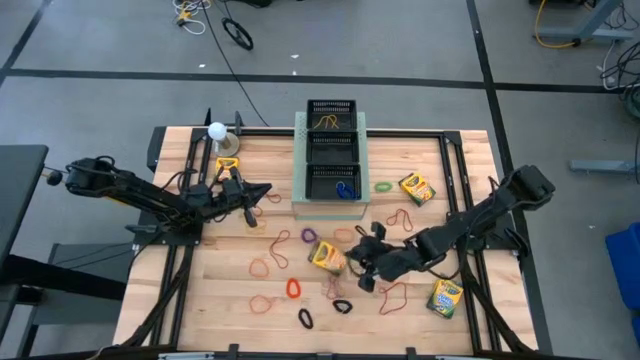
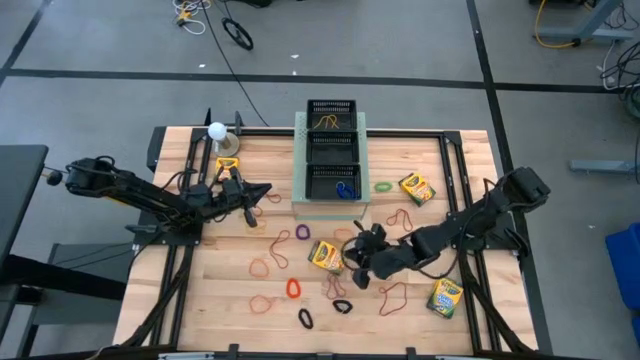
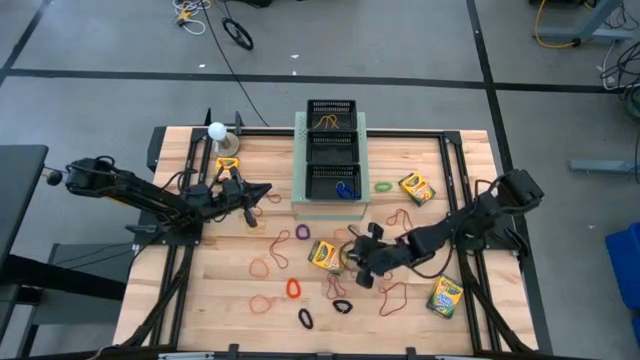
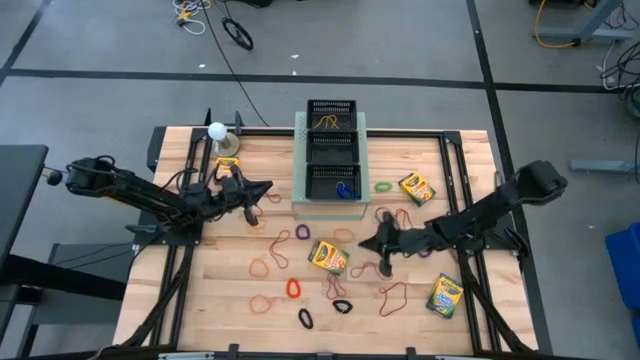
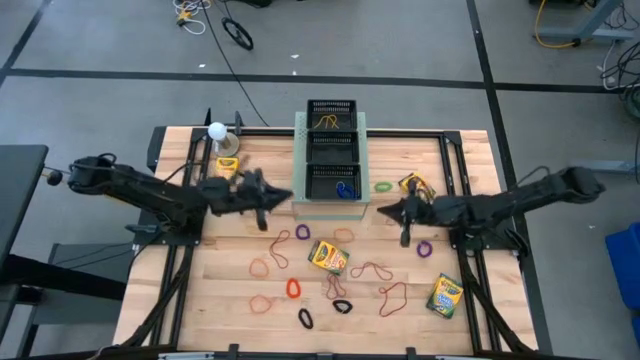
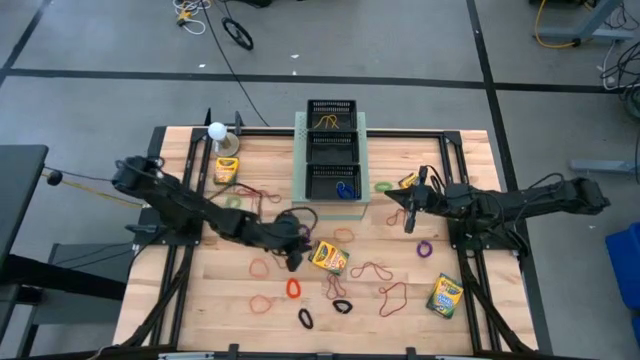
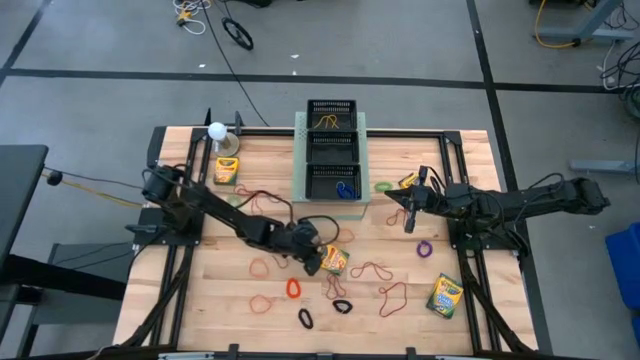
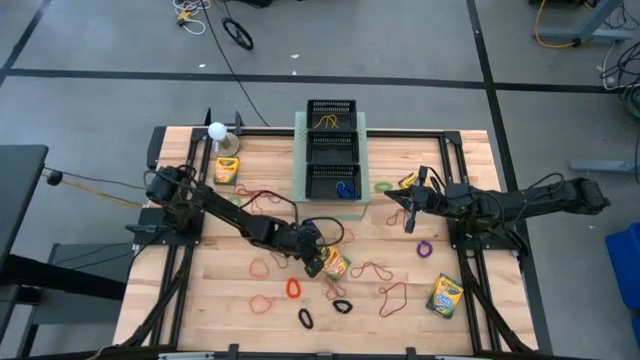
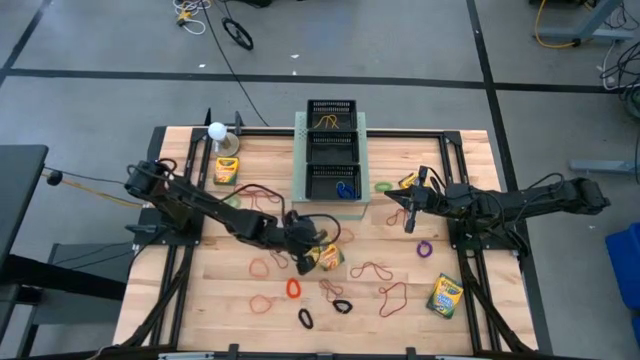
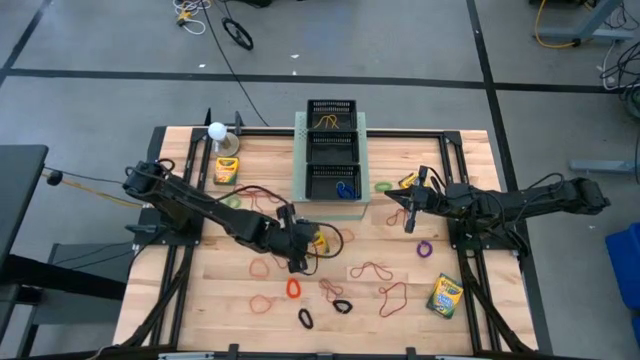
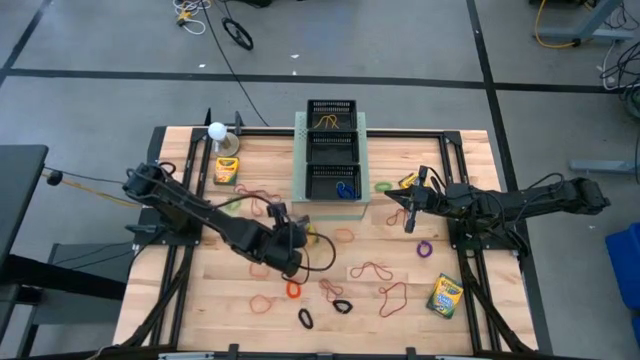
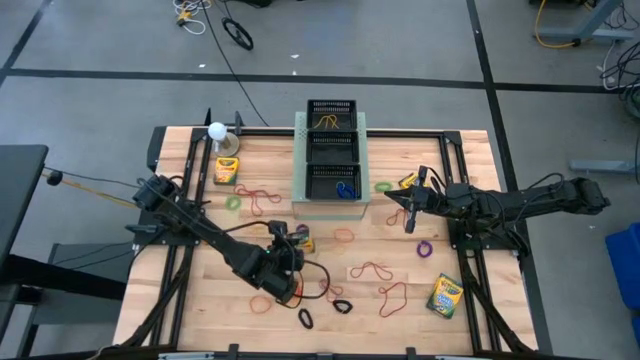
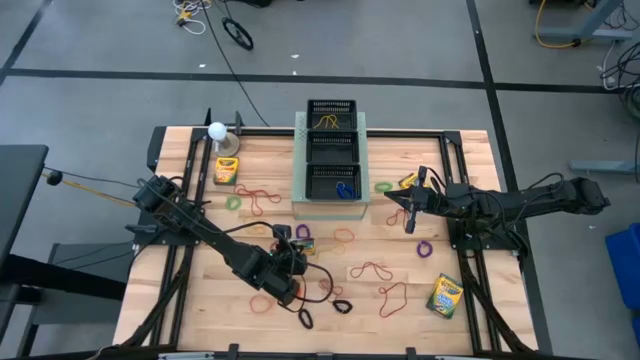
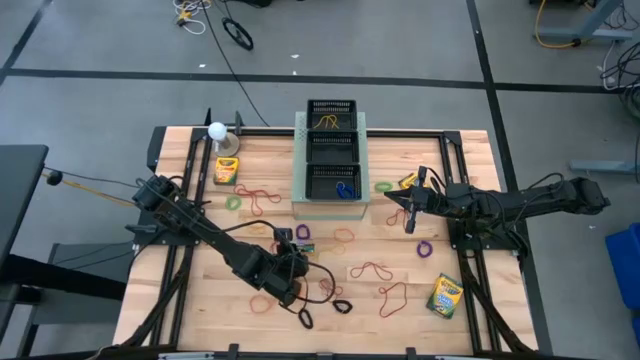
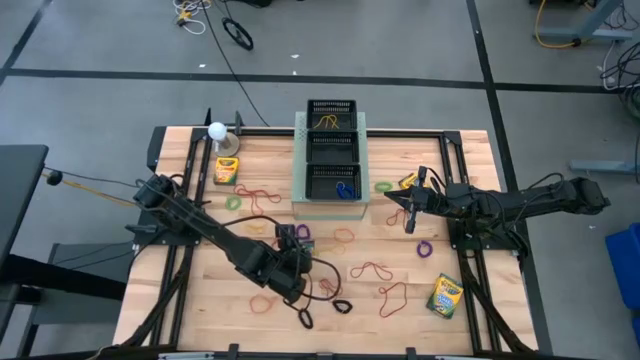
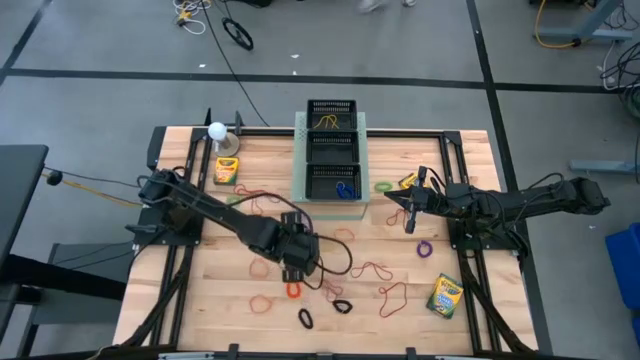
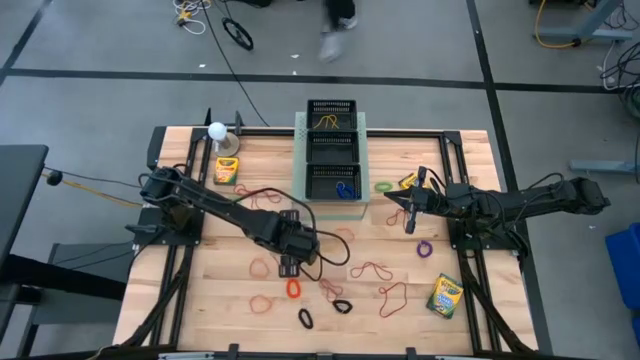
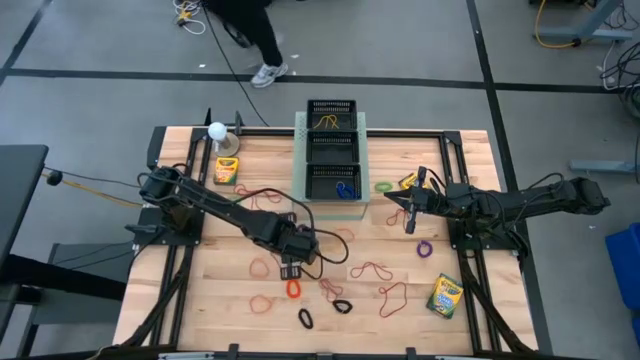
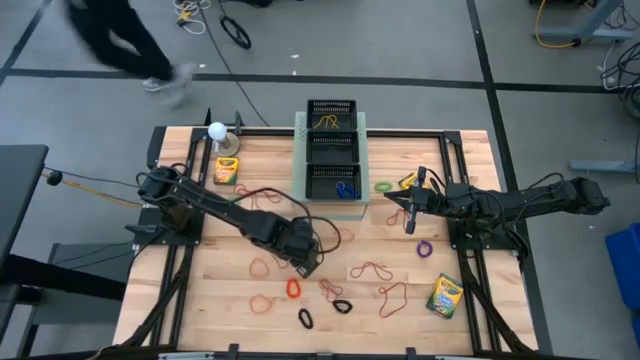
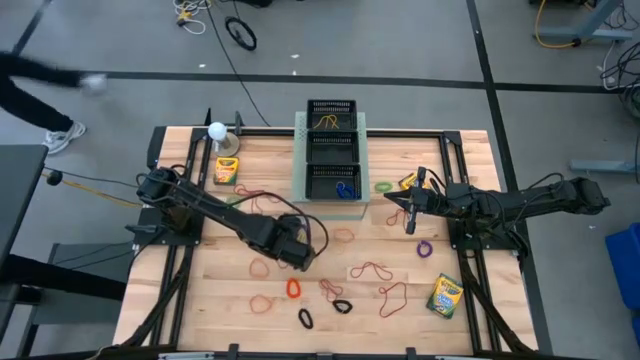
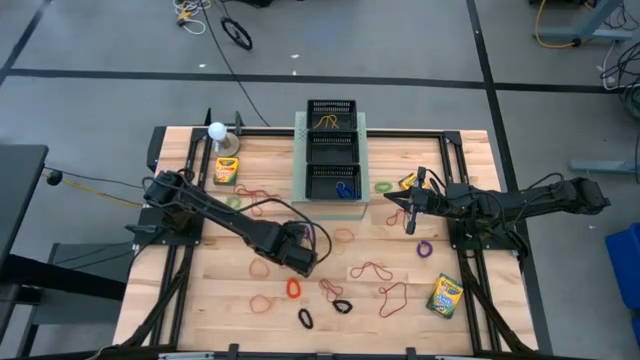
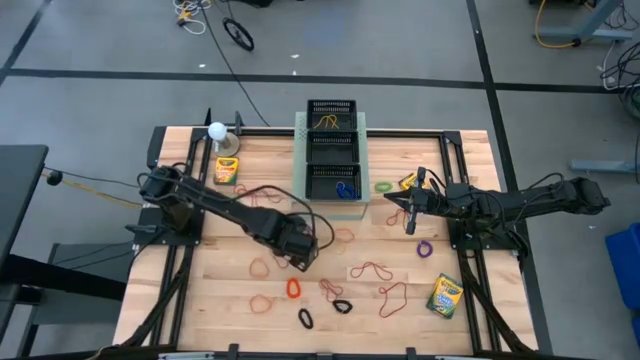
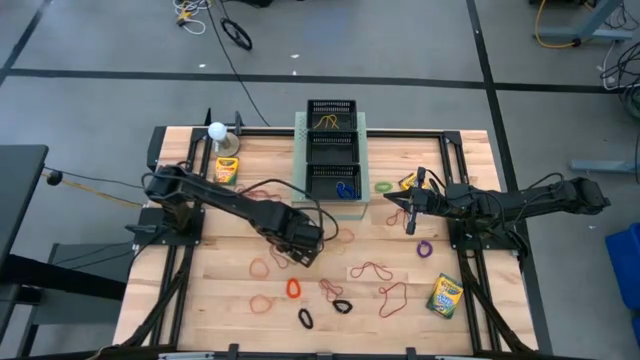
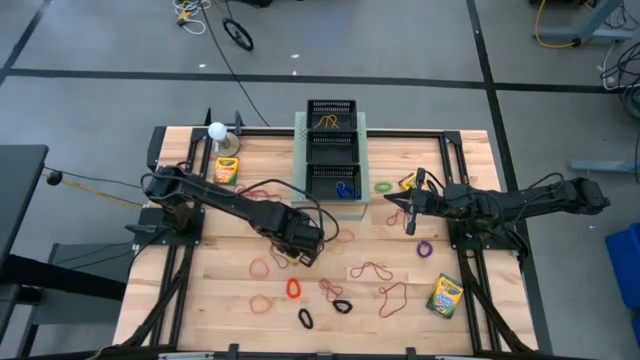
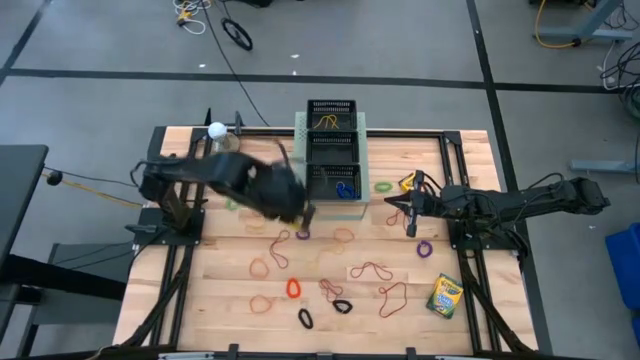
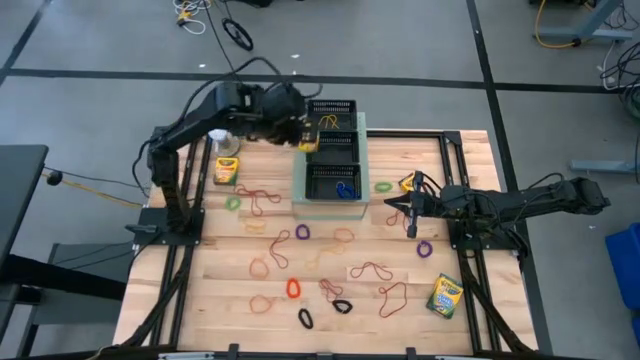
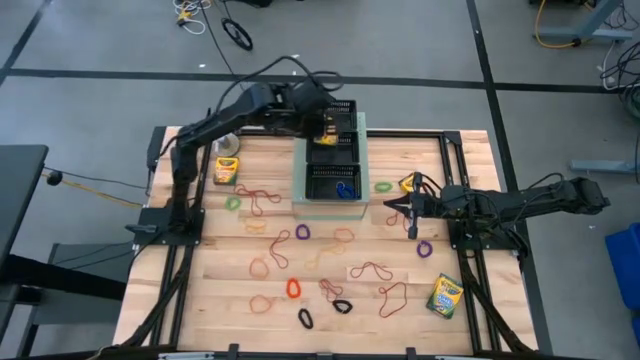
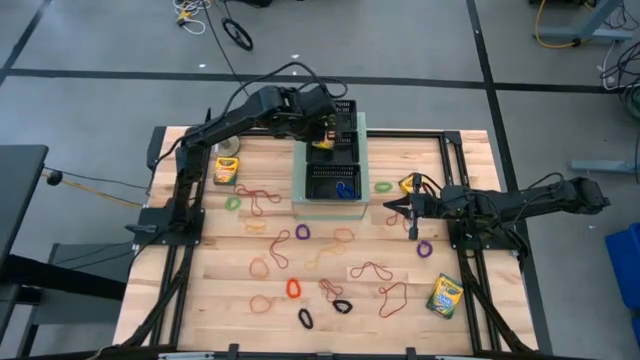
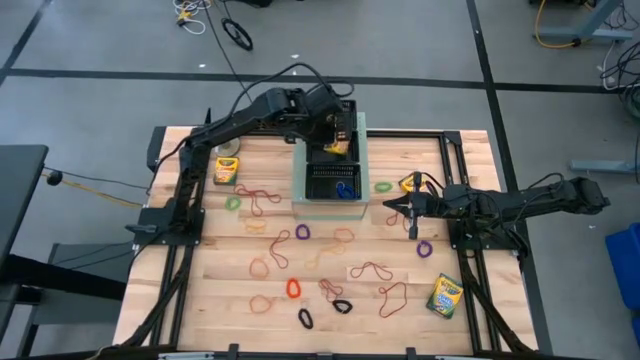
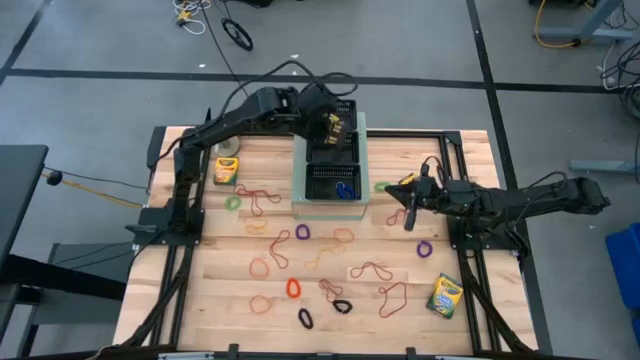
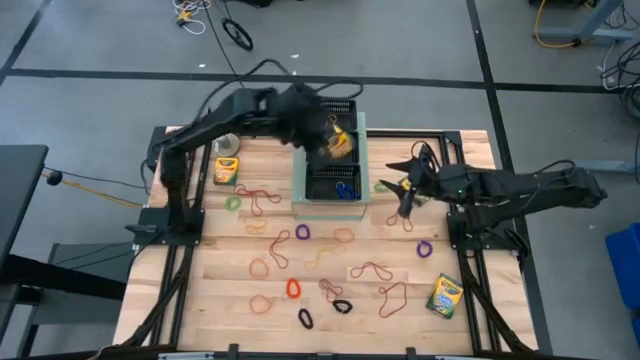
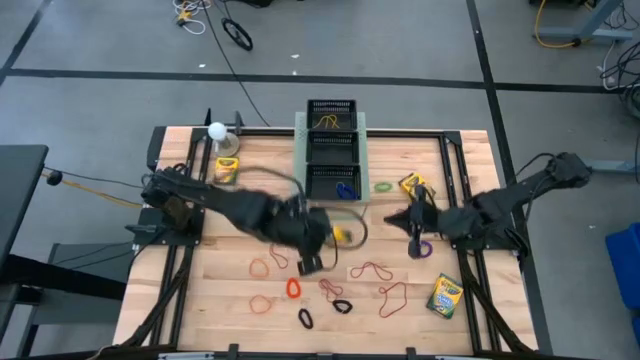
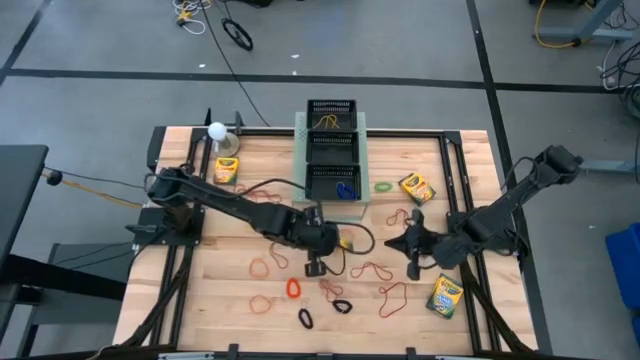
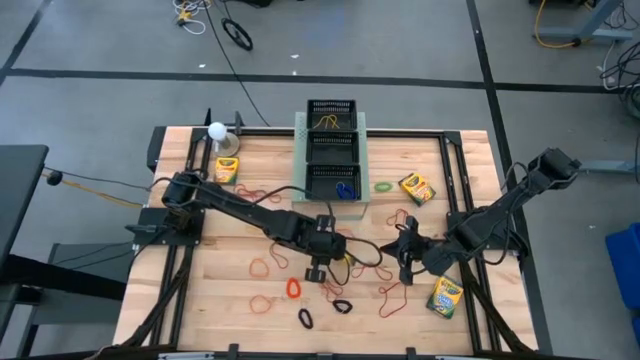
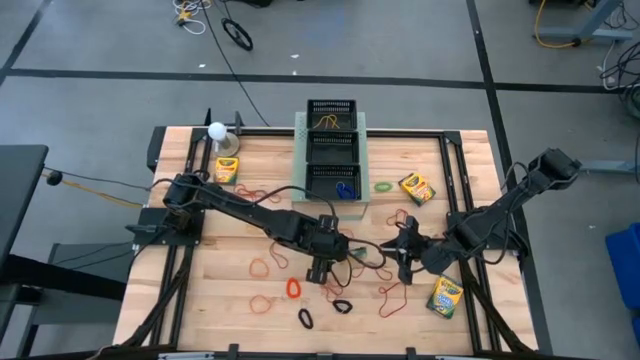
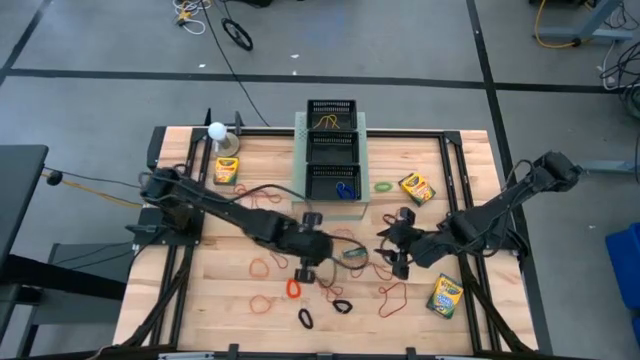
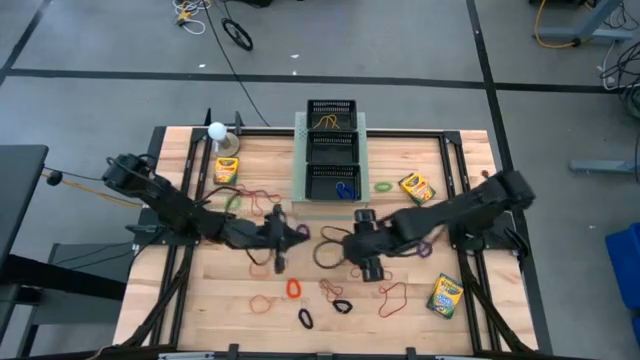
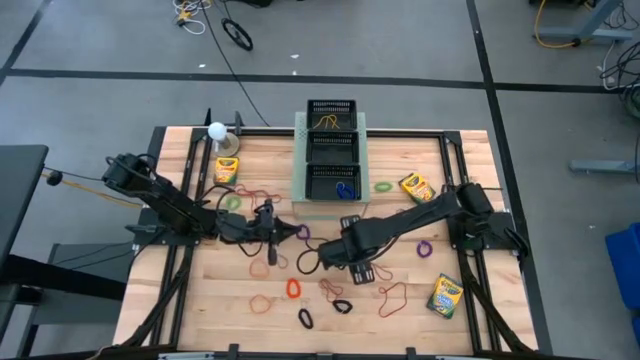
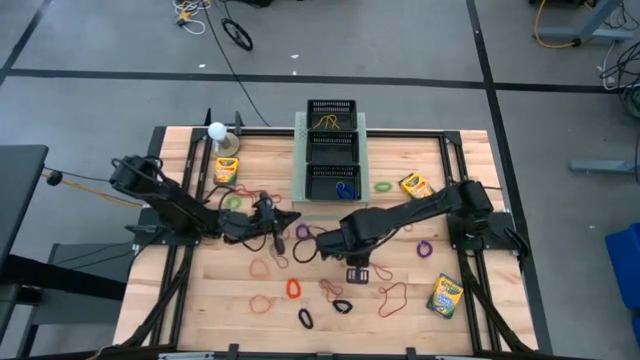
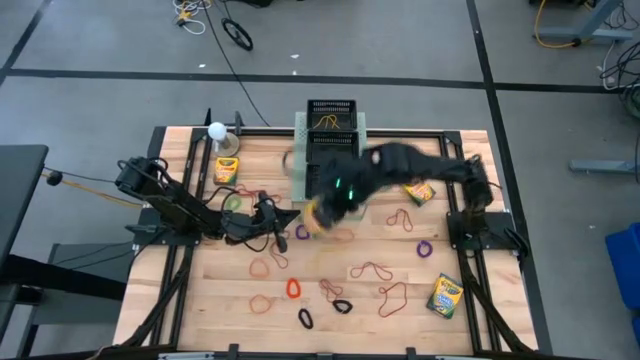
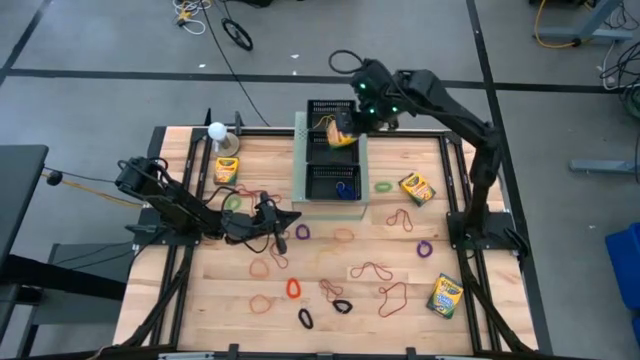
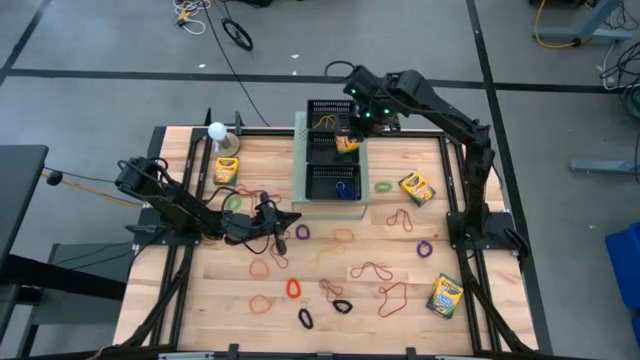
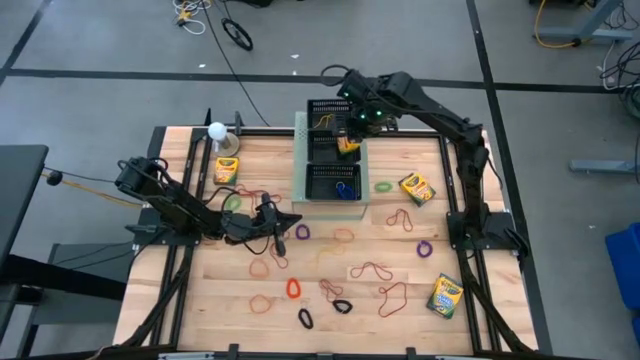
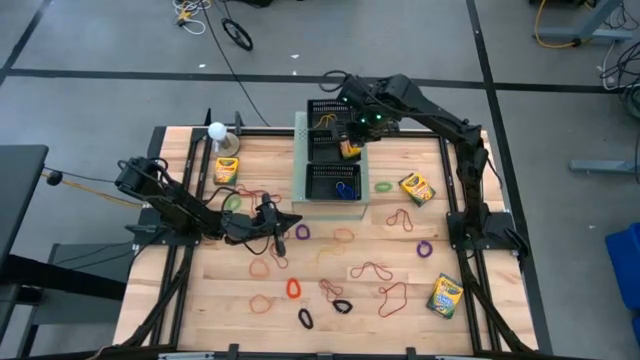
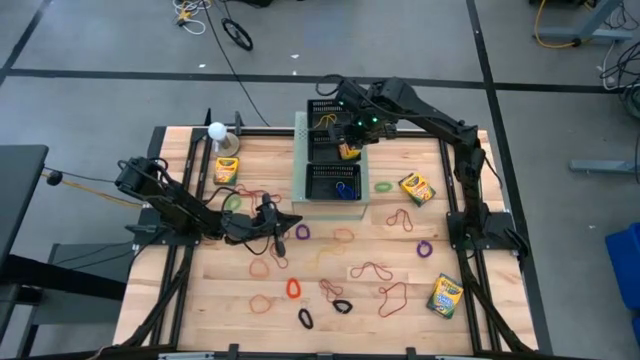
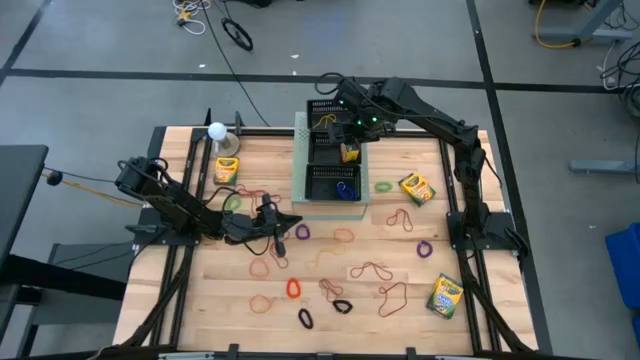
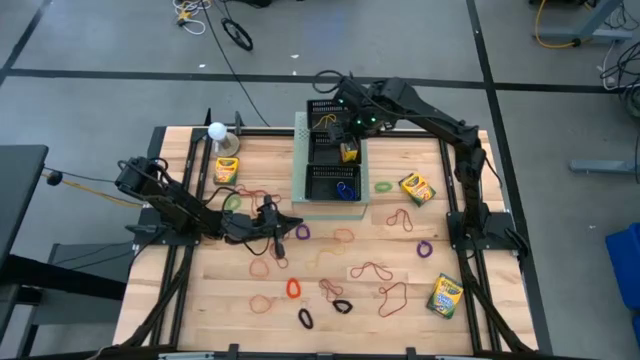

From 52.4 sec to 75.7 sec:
Task: Pick & Place Office Desk Supplies
Put the yellow crayon box into the middle black bin on the shelf
